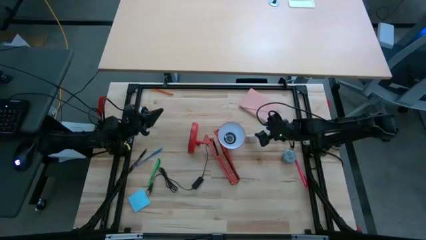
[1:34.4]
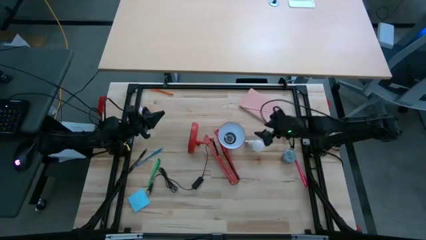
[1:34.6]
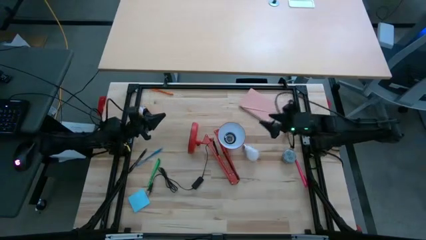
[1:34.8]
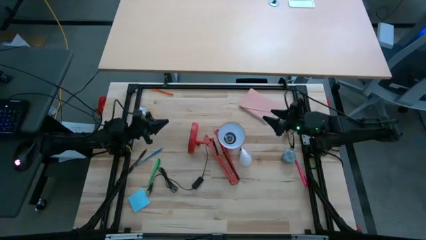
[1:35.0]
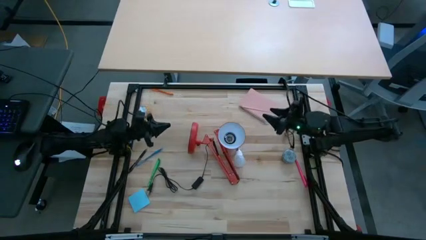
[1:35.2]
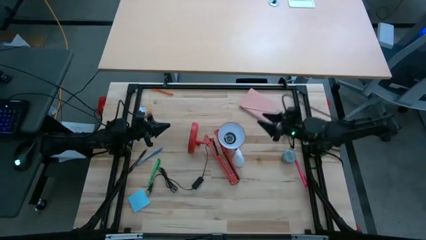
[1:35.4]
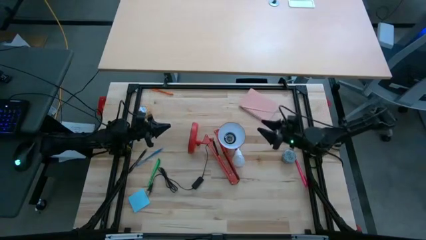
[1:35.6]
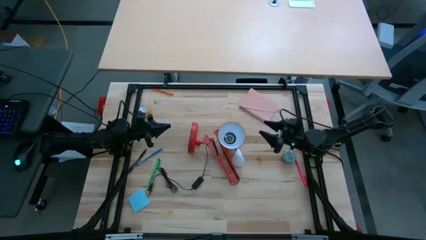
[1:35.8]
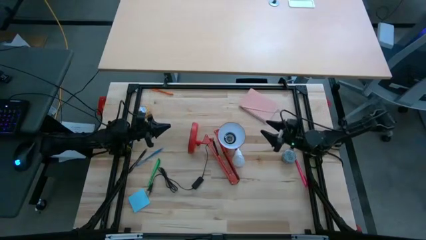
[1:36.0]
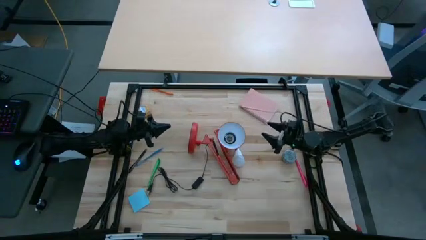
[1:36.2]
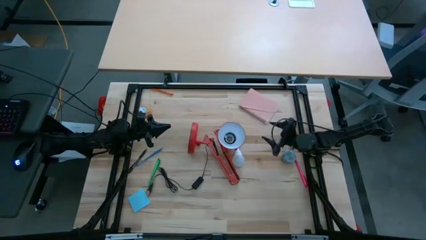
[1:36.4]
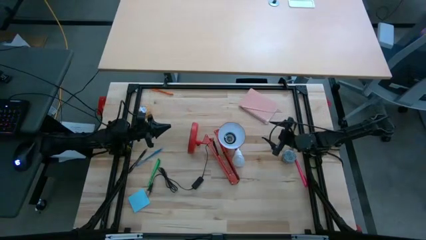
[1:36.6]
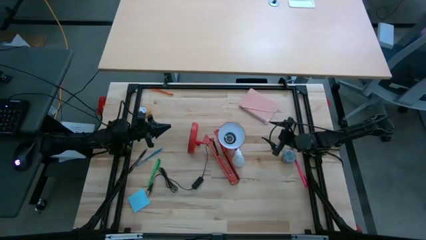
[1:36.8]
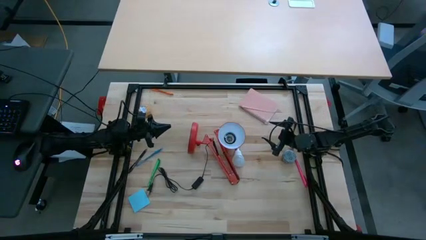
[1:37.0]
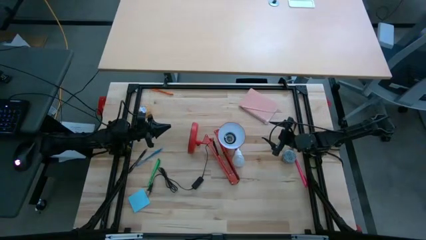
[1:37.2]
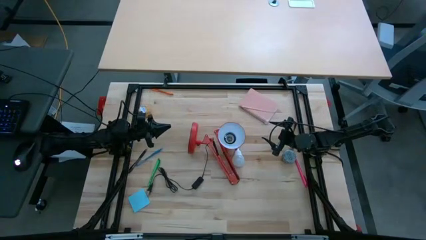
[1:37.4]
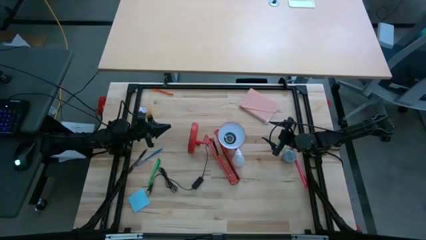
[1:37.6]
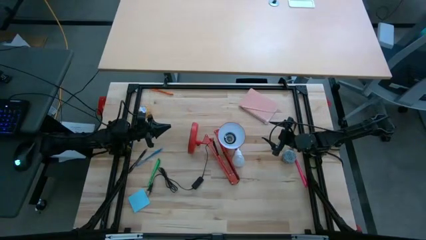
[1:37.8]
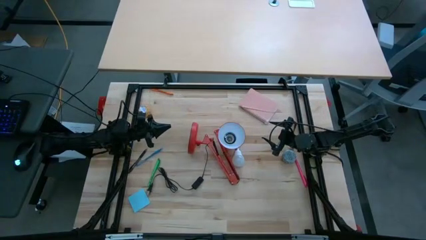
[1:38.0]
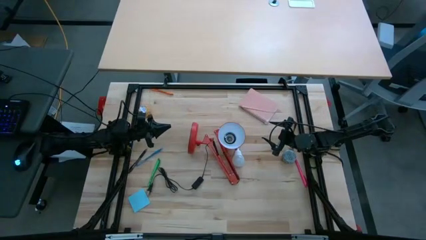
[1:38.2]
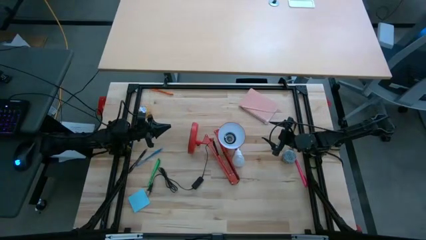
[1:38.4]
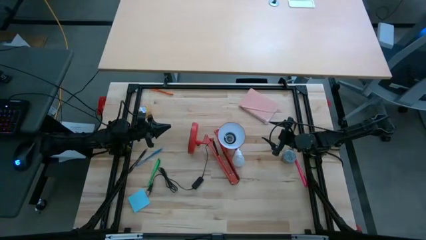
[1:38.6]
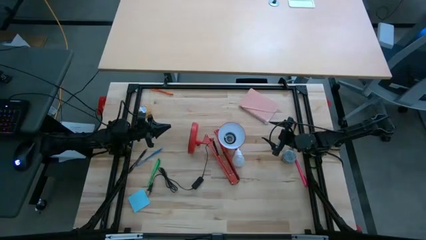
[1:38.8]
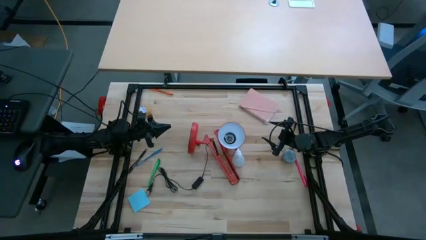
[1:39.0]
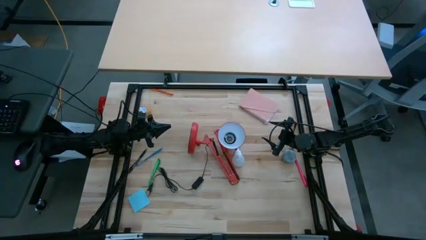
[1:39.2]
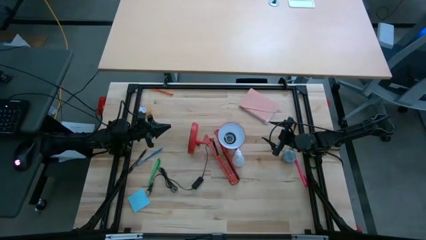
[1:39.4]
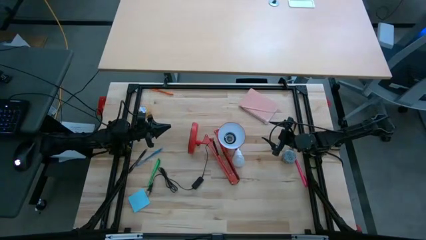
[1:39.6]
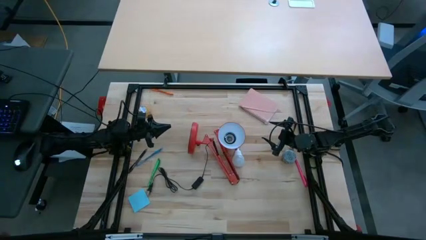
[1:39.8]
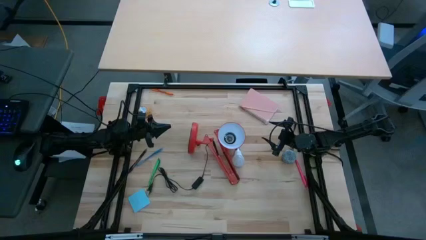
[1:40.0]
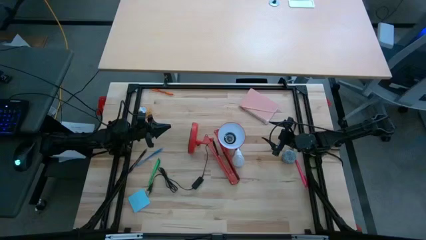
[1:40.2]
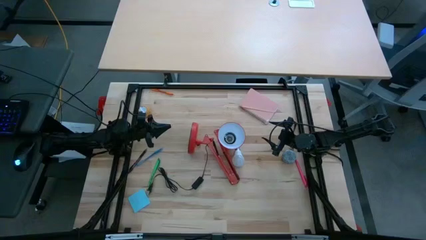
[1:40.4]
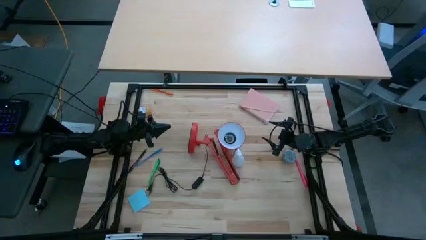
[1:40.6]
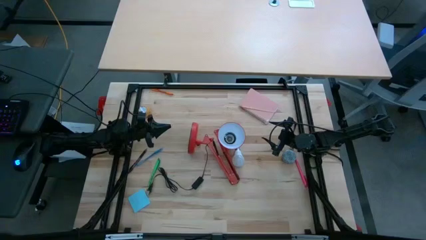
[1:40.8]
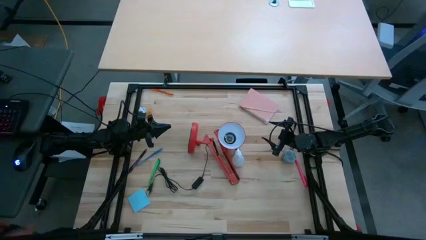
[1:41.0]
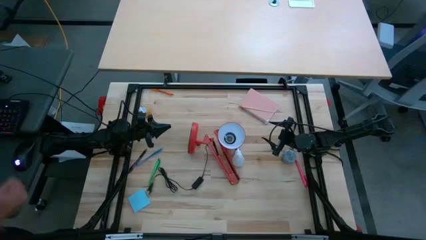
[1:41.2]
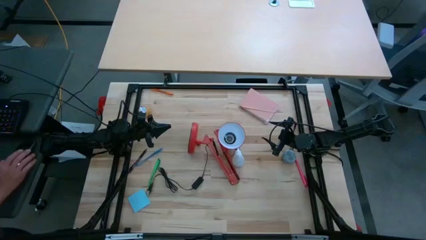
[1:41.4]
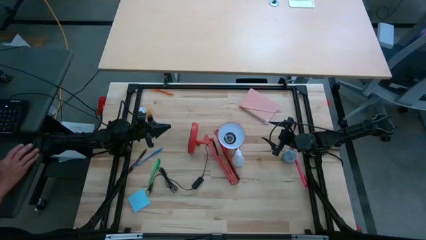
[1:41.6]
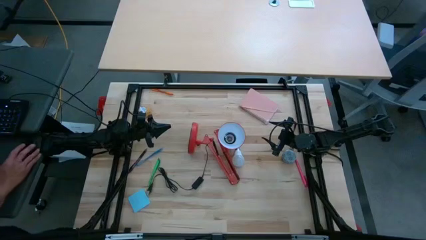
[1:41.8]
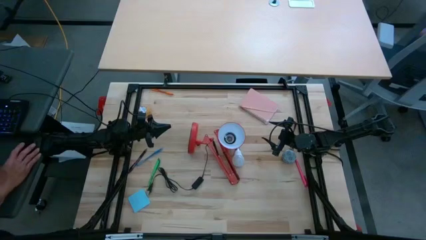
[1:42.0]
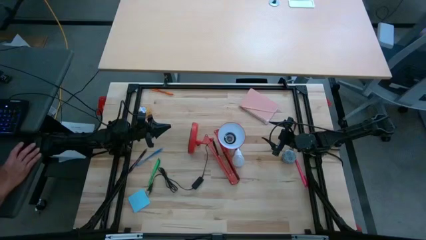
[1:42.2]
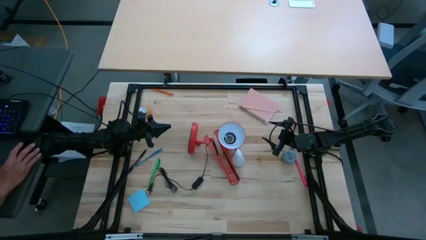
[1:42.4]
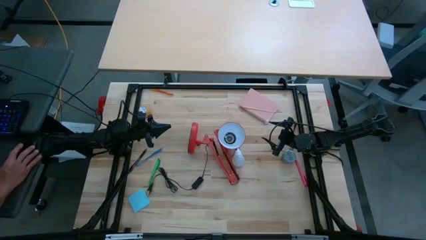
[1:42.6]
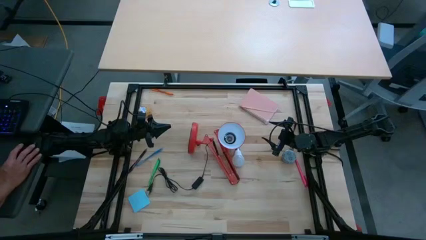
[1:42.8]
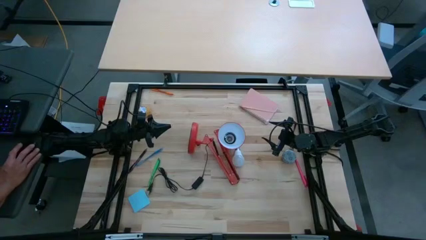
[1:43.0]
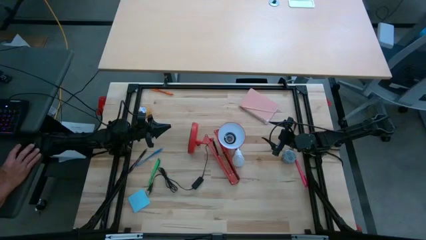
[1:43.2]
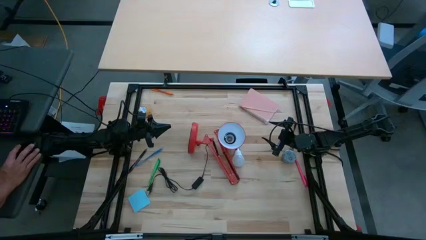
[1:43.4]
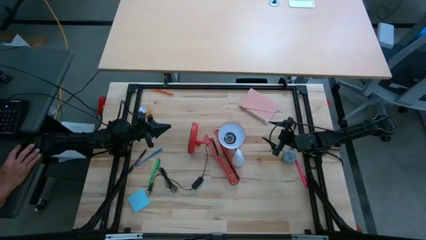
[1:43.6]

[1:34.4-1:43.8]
Task: Screw lightbulb
Return to Home Position

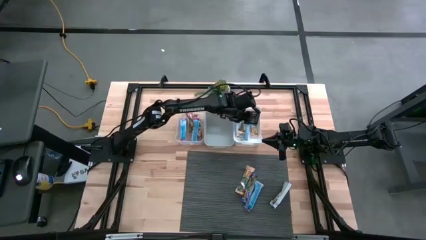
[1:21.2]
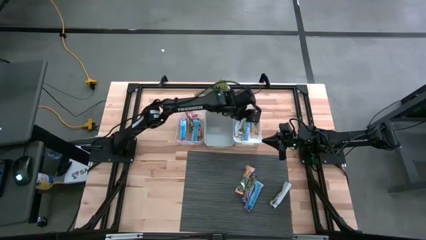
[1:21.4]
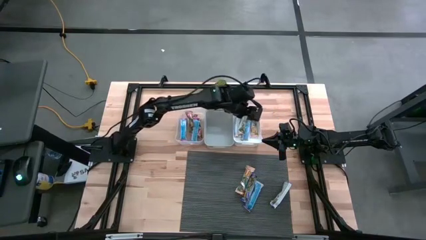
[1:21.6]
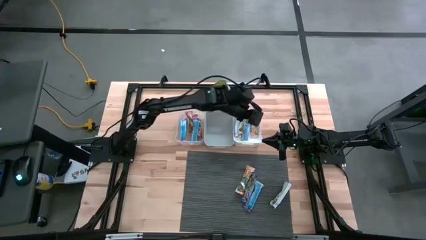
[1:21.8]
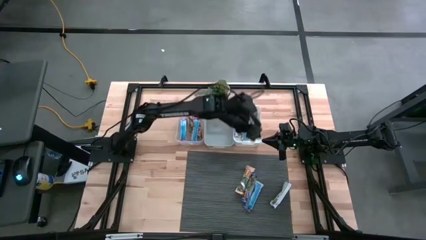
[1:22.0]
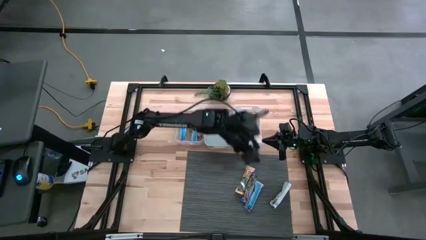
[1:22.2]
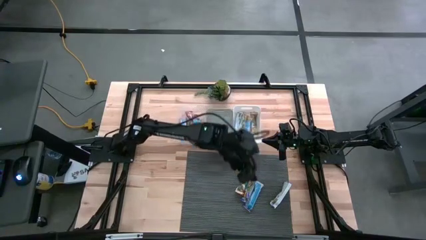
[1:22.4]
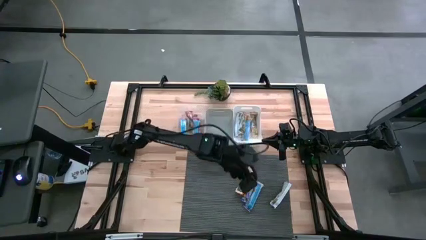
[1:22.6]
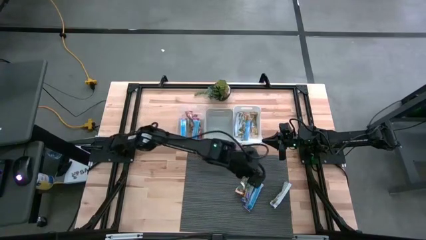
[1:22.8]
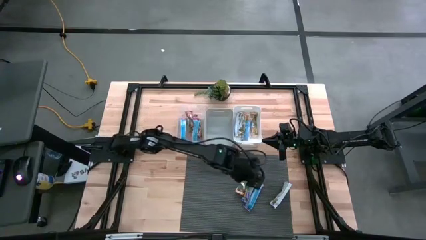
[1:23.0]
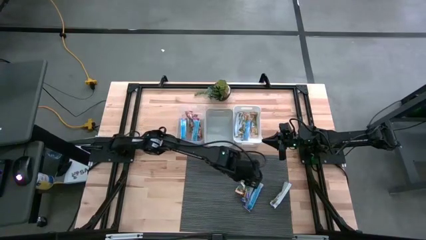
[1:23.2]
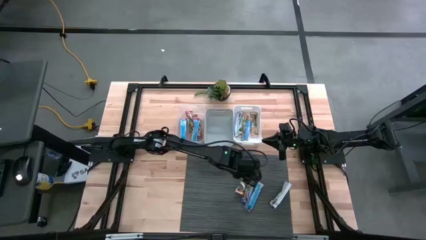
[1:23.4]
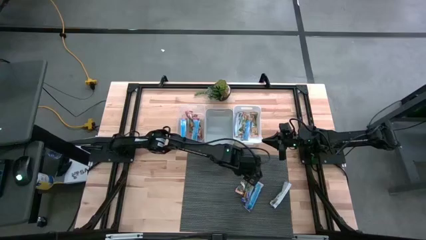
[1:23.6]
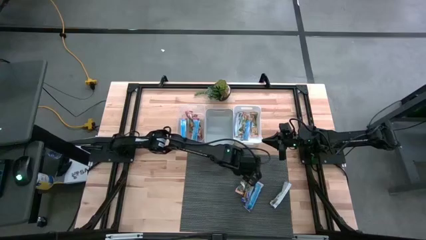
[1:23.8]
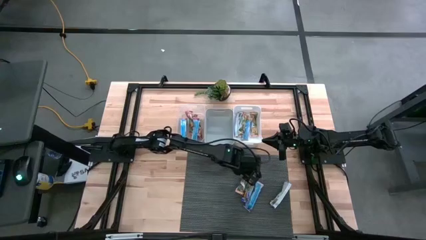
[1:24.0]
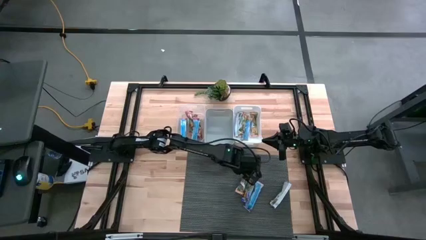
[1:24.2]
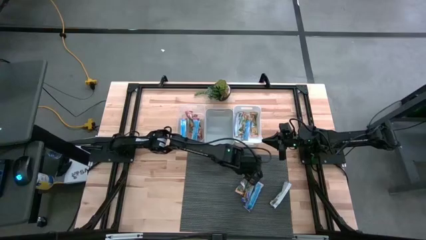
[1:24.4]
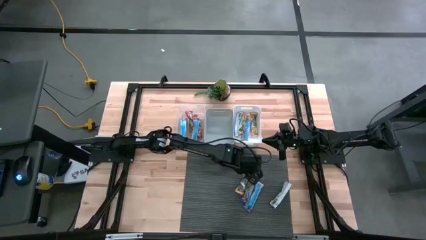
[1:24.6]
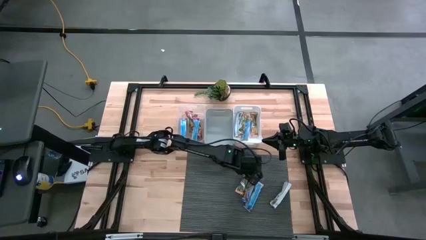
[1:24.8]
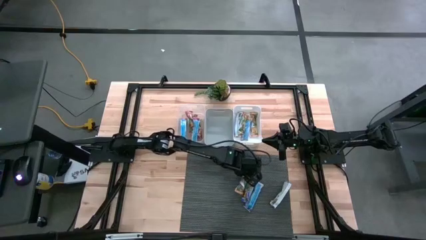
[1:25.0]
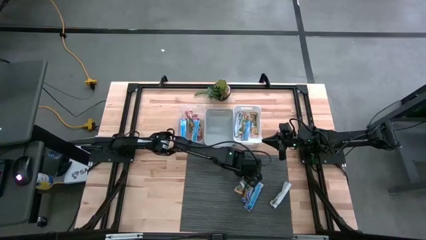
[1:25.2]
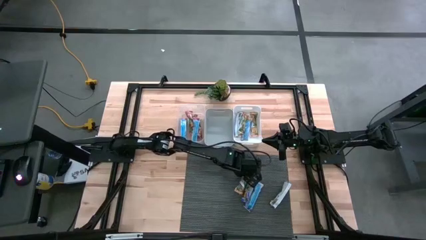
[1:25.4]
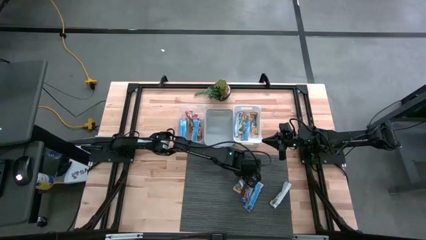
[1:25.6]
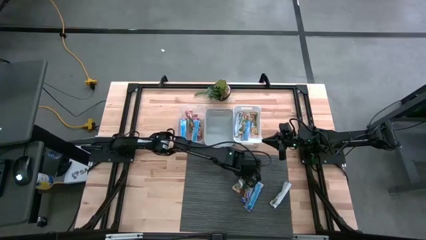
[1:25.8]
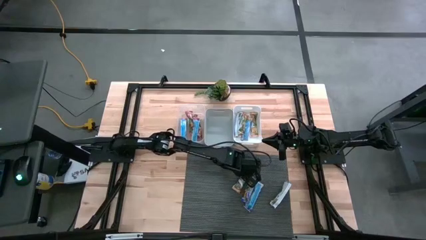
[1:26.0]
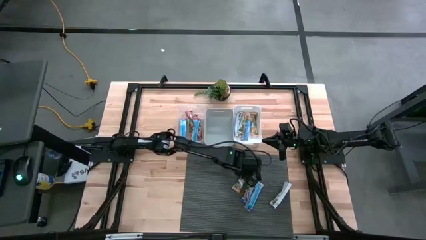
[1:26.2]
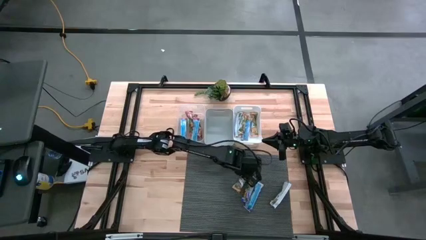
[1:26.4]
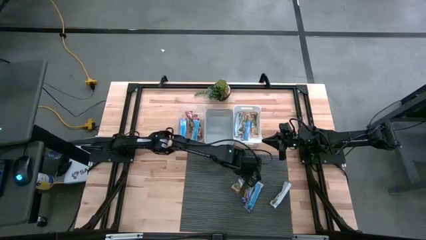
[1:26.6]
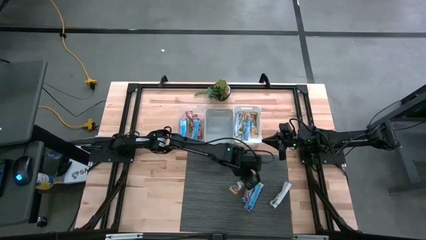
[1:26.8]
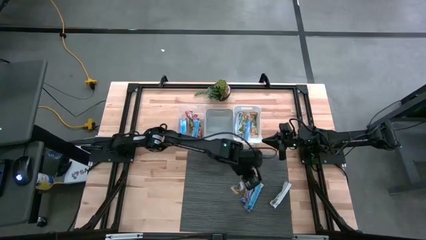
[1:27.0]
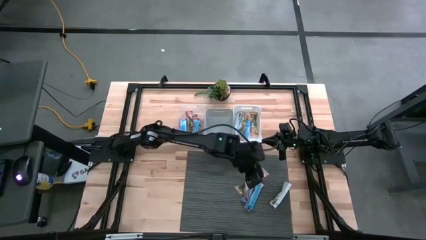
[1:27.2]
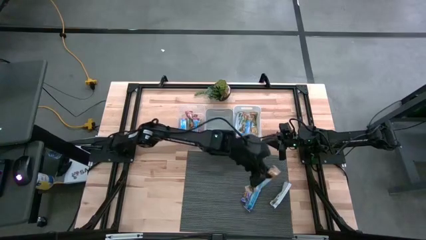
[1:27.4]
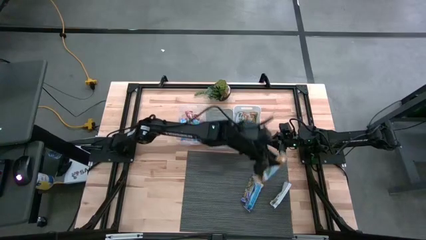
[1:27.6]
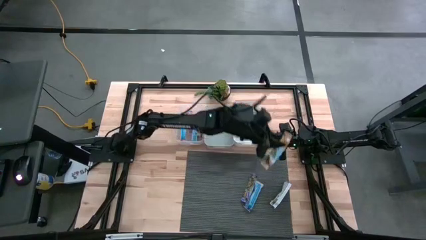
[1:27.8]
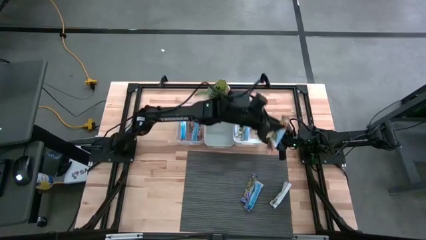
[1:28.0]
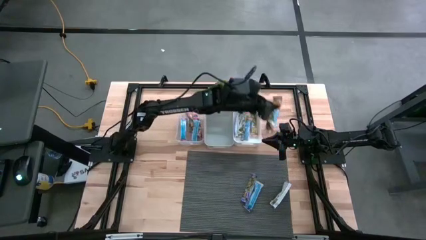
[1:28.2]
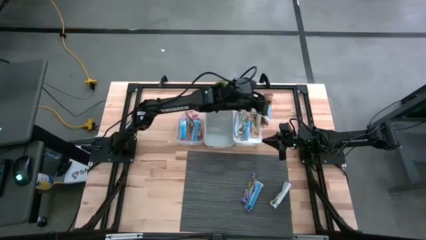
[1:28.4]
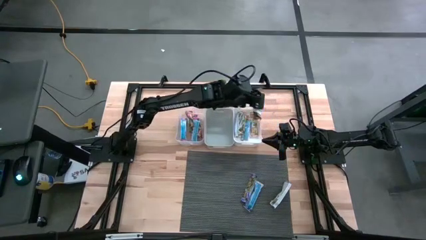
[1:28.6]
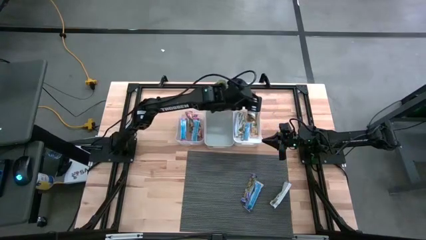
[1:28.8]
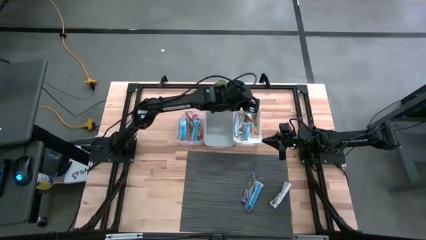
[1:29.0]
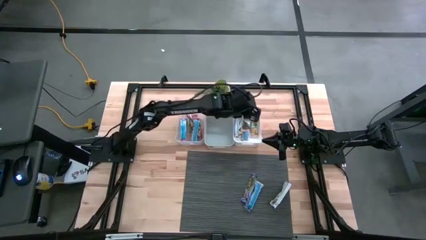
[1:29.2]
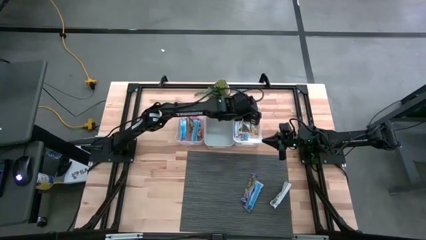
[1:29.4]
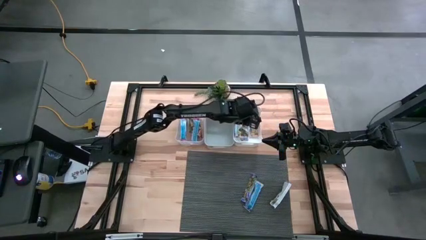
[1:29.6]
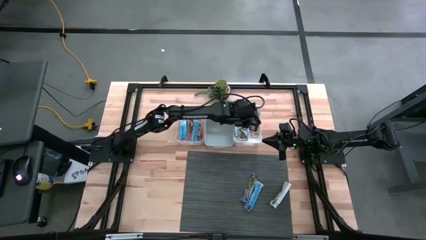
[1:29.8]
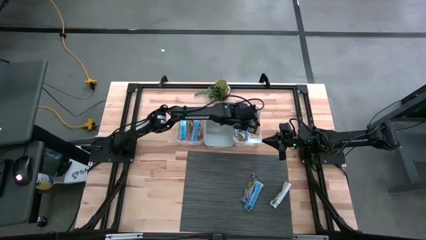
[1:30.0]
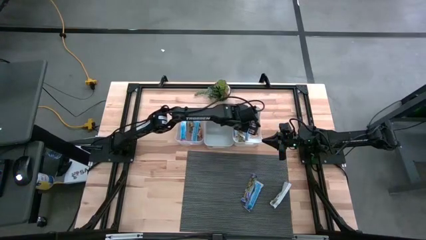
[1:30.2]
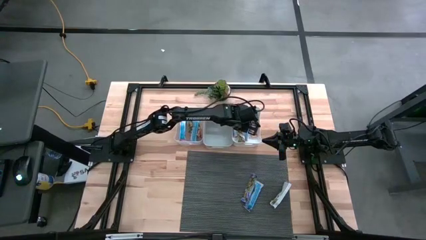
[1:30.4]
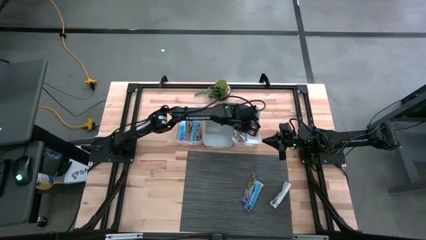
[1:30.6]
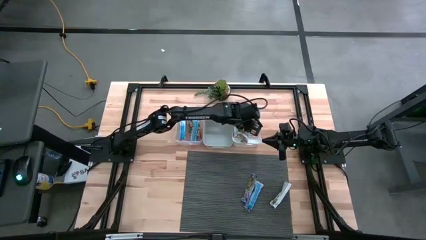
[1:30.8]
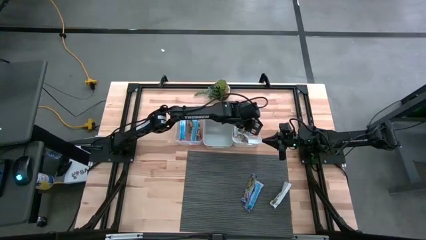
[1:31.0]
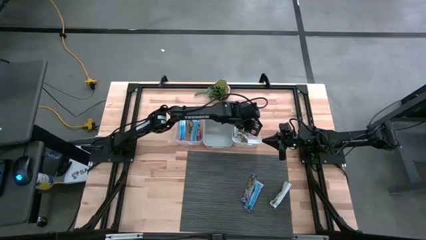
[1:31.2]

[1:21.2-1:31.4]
Task: Pick and place Granola Bars by type
Put the yellow granola bar into the white bin
